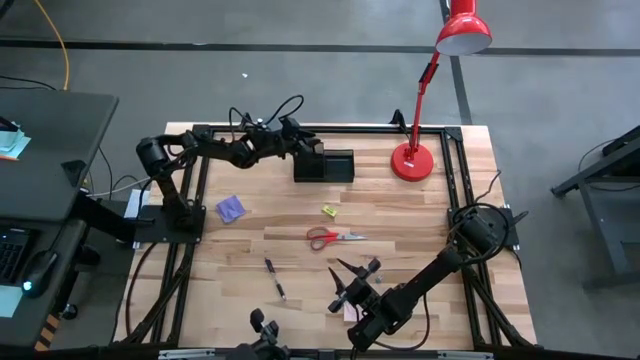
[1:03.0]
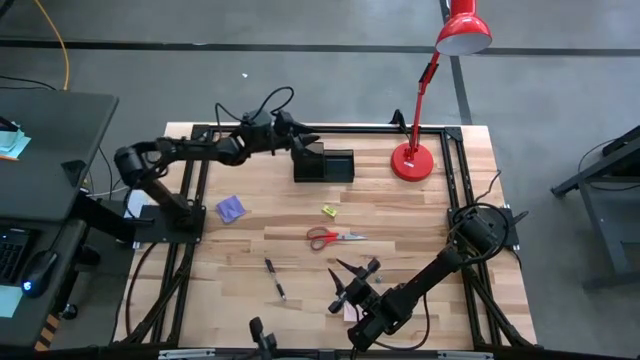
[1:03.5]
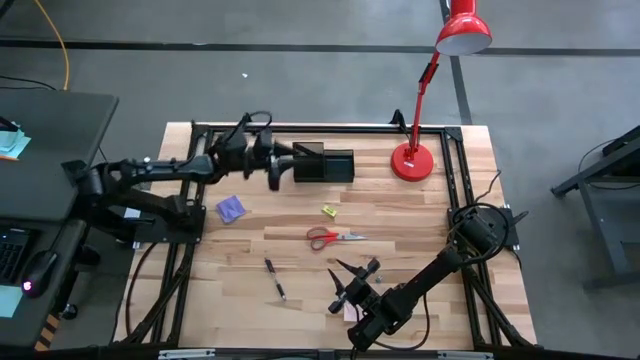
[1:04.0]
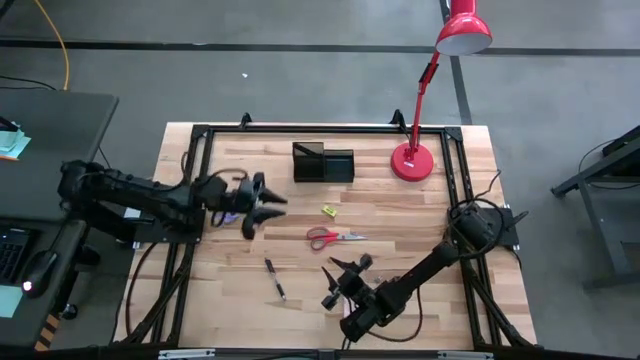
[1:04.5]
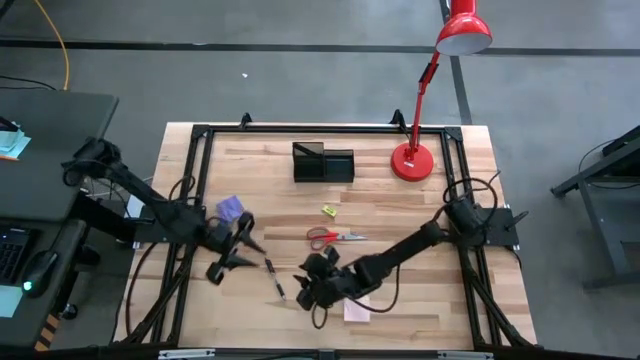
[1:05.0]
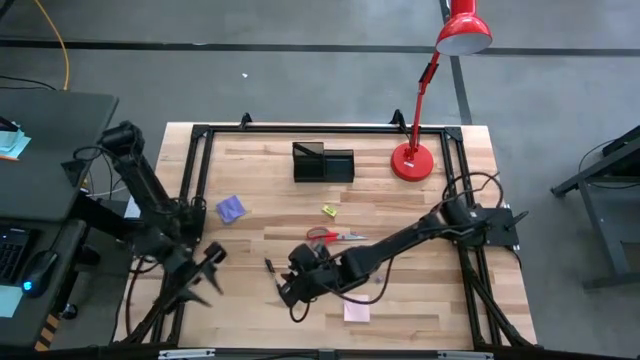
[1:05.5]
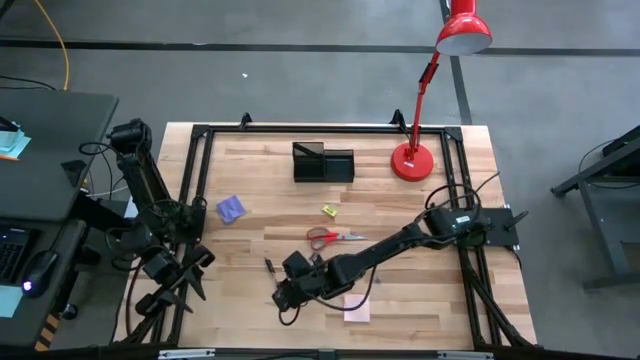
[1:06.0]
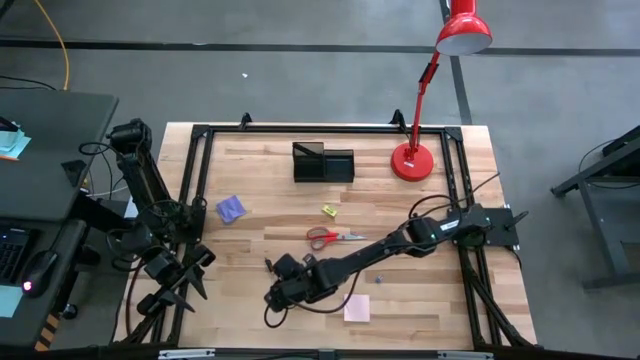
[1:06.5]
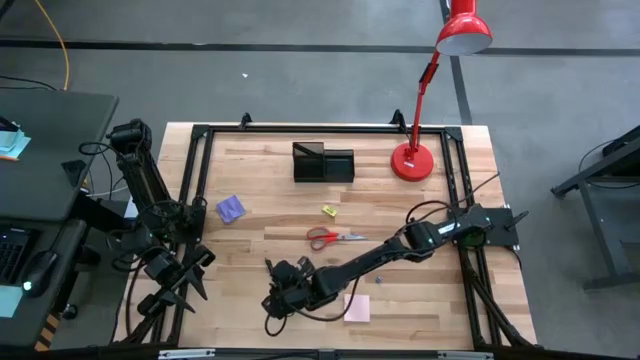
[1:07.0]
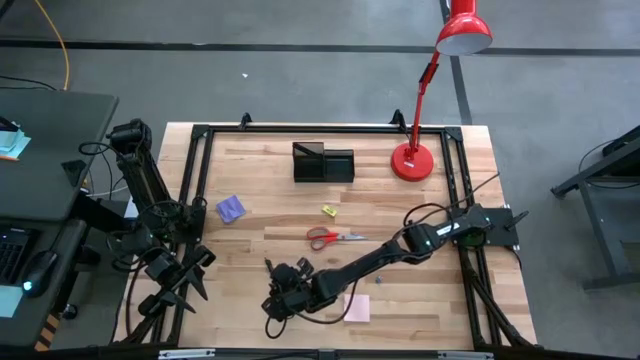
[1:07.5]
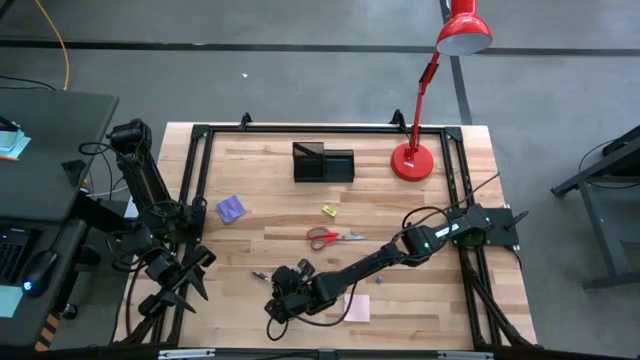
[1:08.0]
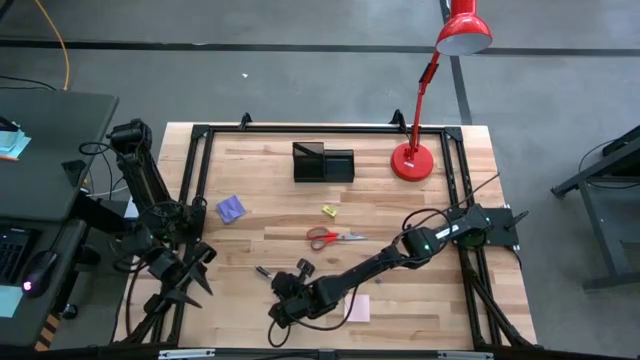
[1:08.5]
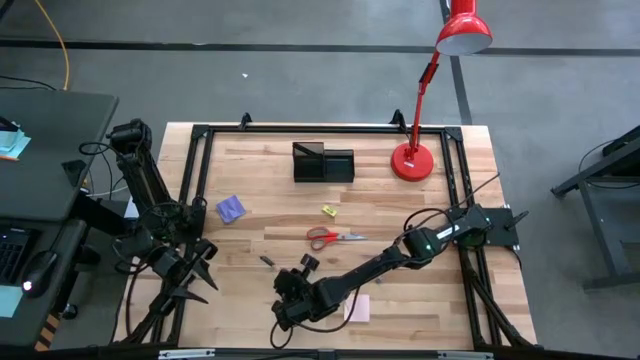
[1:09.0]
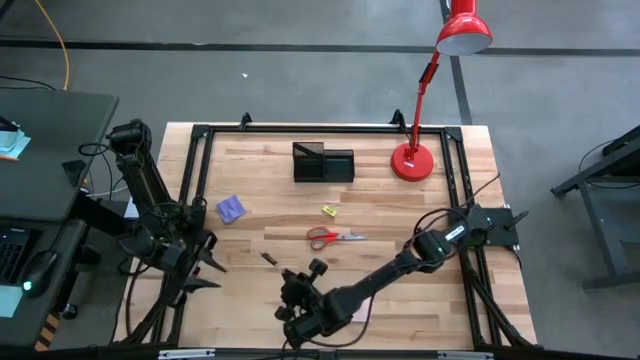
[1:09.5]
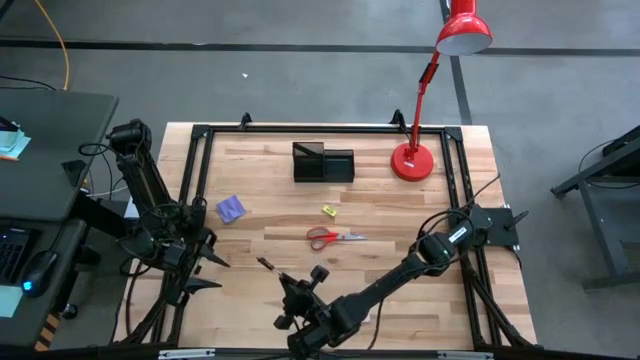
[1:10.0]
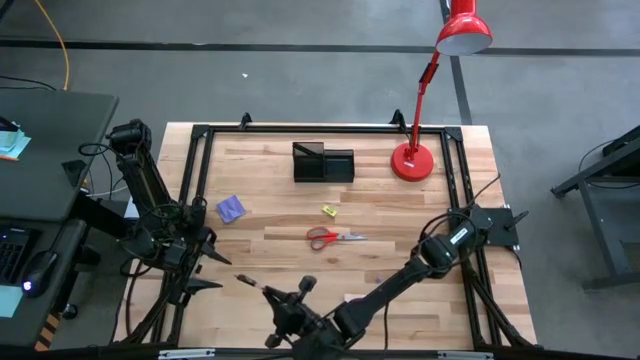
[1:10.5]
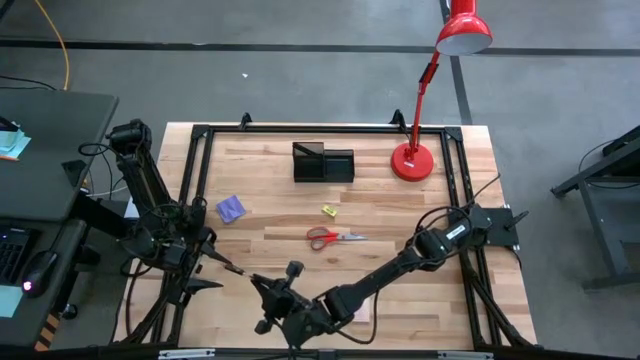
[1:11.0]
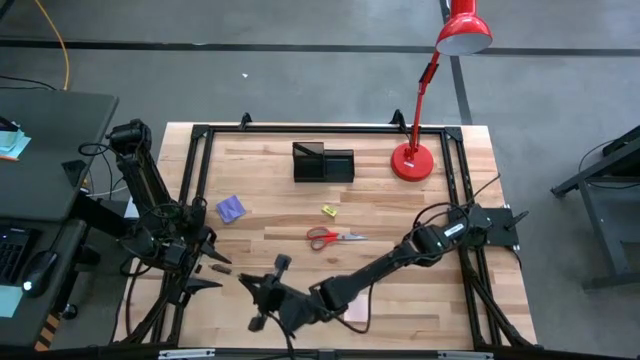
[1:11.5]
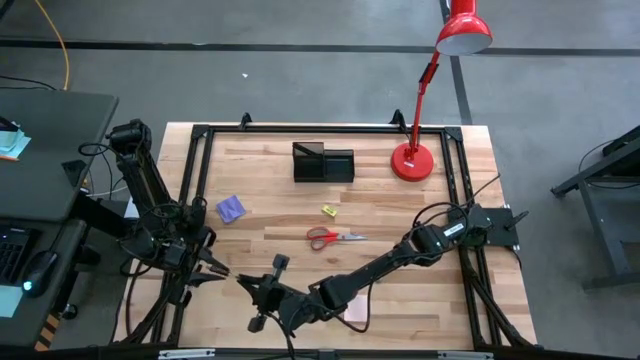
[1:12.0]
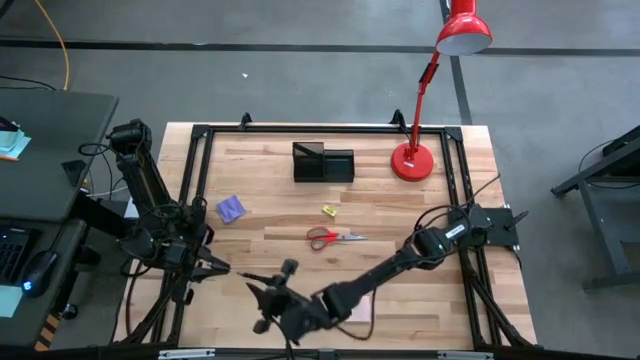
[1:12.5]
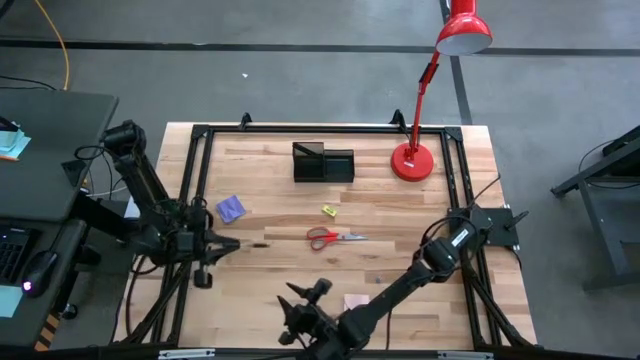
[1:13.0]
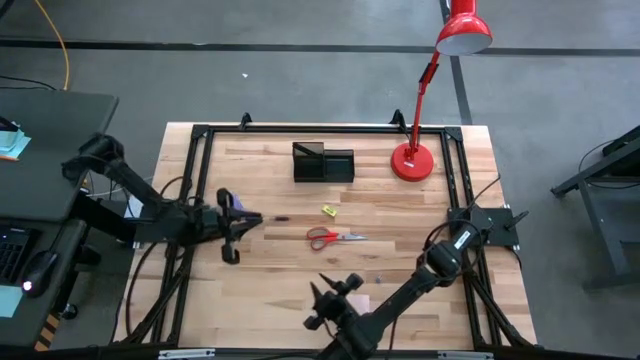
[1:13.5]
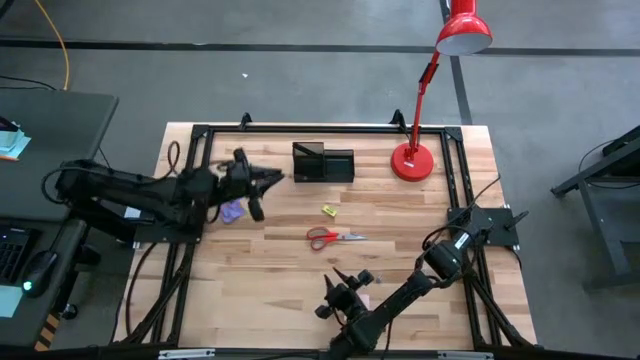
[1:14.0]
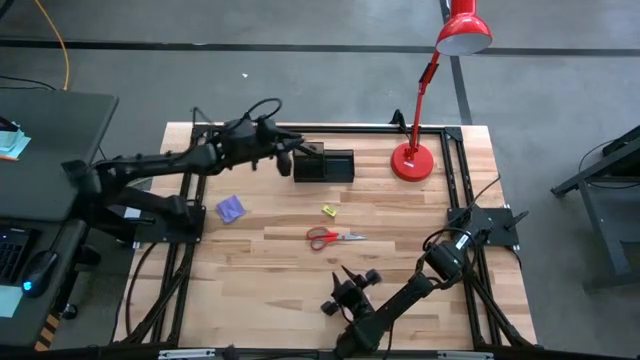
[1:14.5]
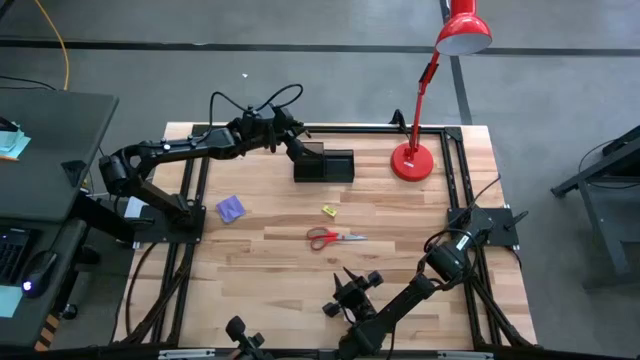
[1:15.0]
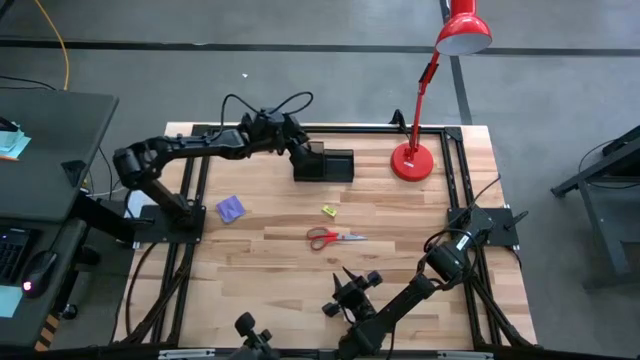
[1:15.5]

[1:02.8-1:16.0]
Task: Pick and place office supplies into organizer
Put the transparent pen into the desk organizer

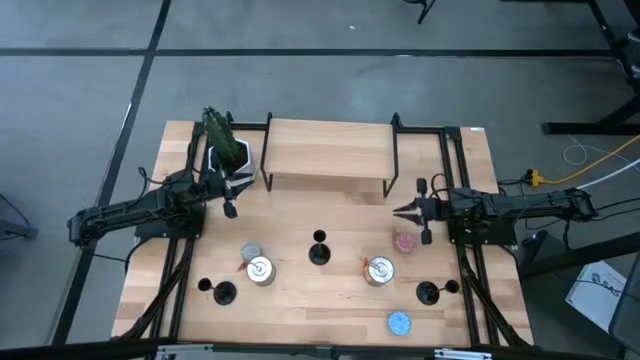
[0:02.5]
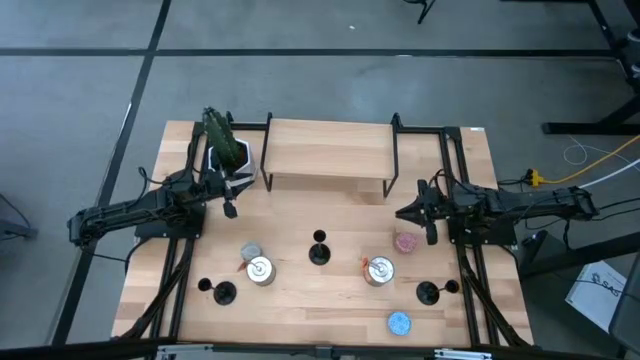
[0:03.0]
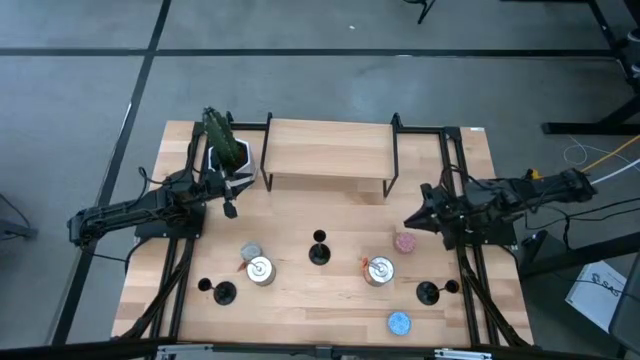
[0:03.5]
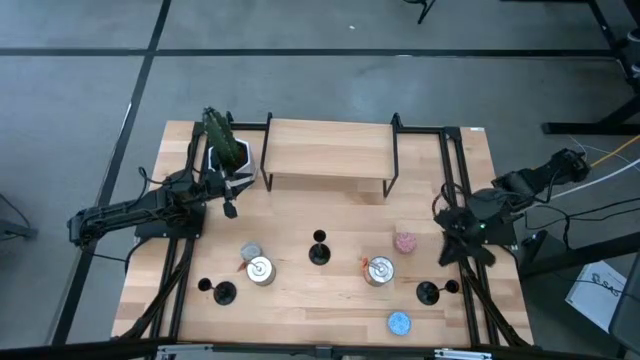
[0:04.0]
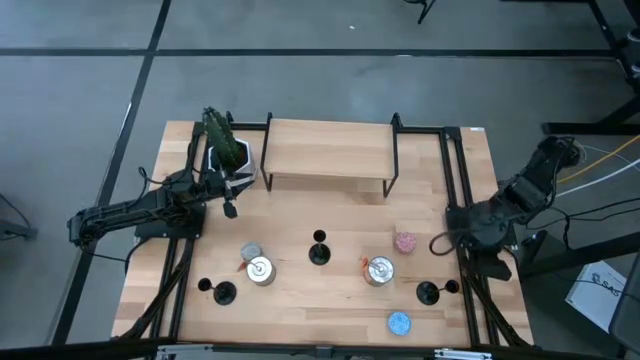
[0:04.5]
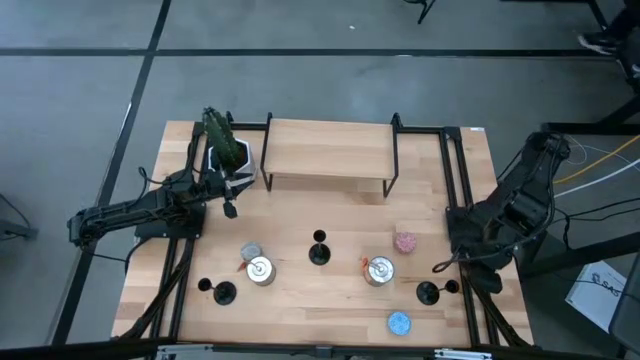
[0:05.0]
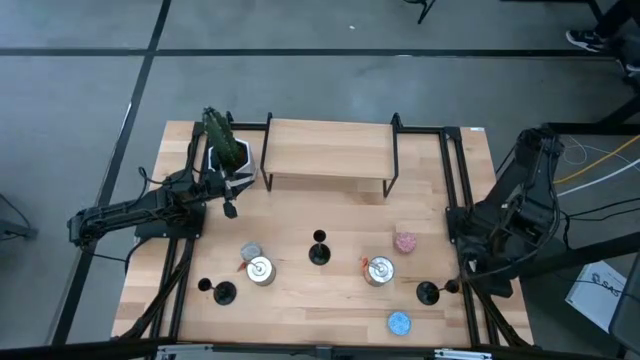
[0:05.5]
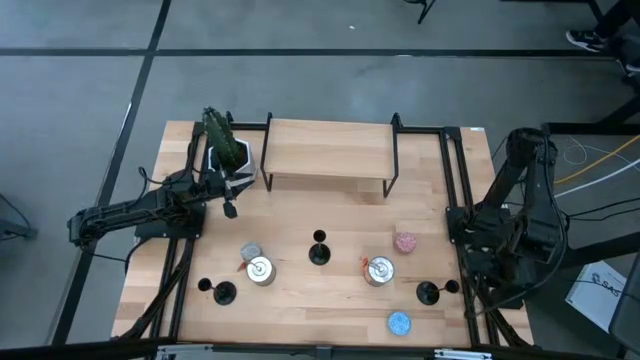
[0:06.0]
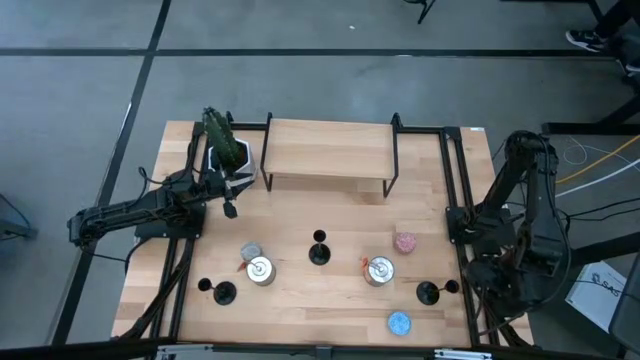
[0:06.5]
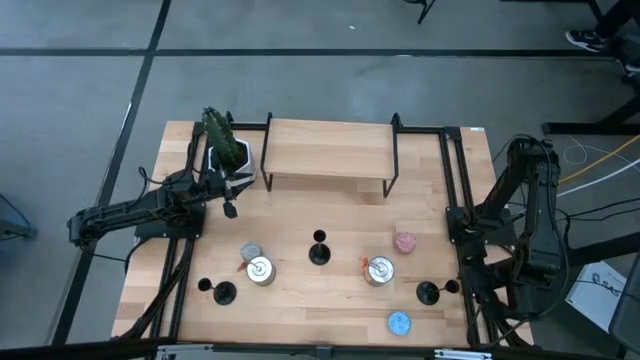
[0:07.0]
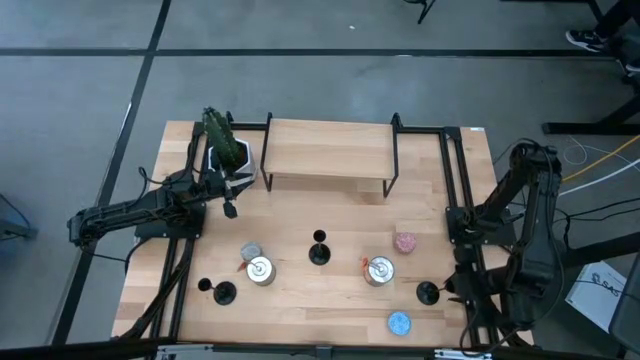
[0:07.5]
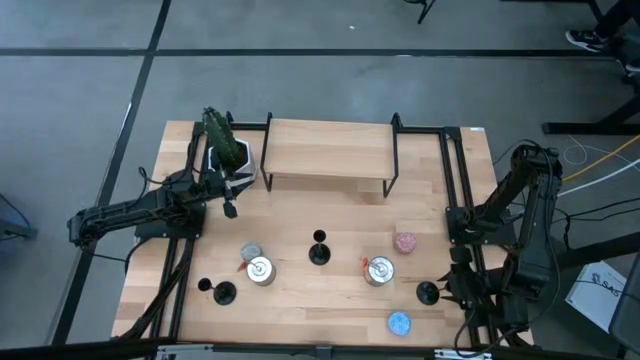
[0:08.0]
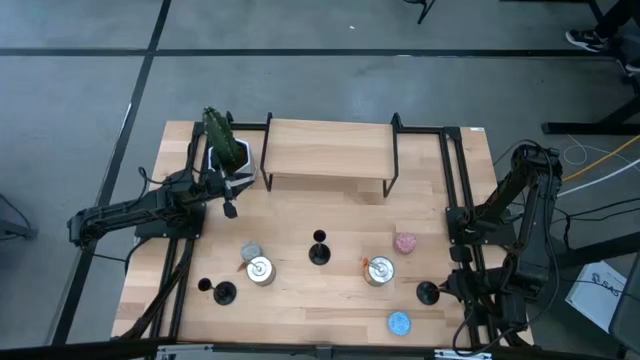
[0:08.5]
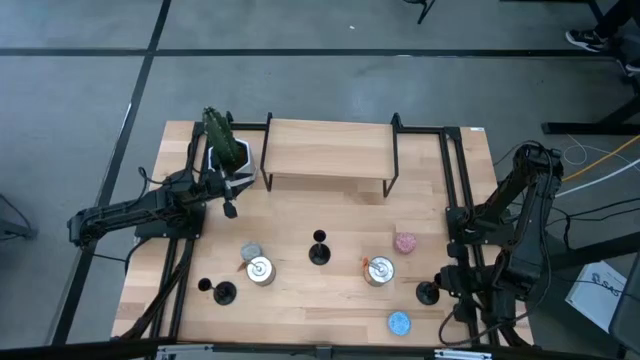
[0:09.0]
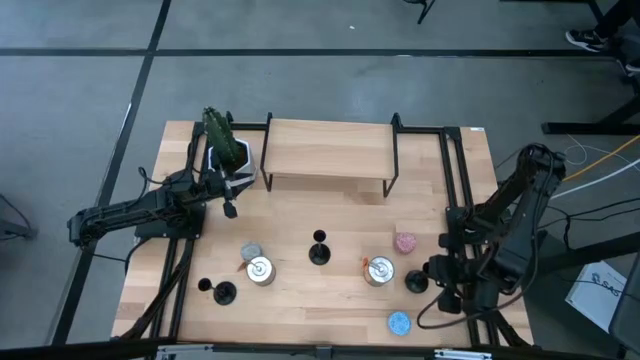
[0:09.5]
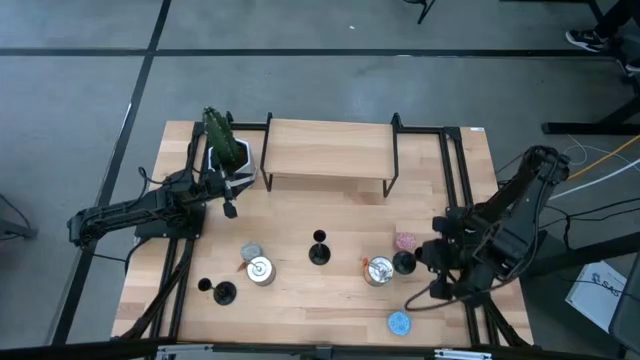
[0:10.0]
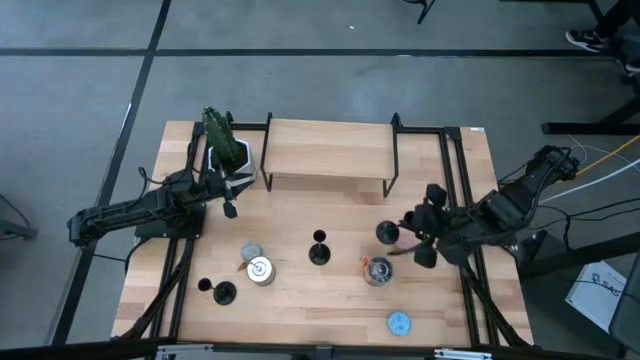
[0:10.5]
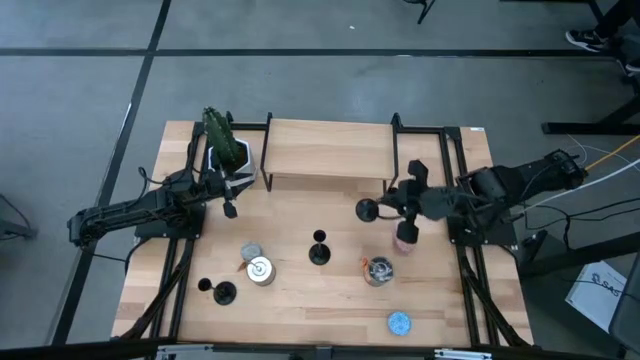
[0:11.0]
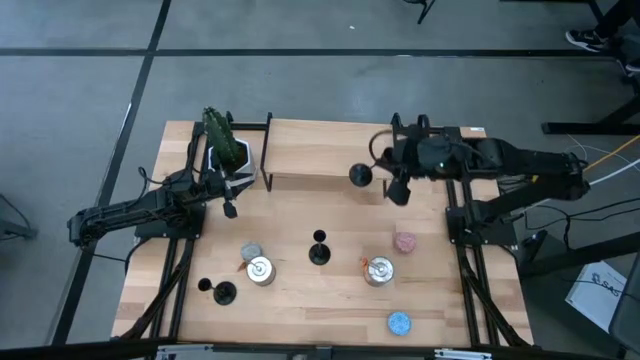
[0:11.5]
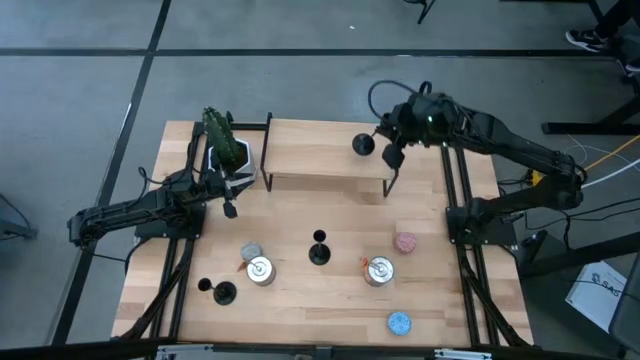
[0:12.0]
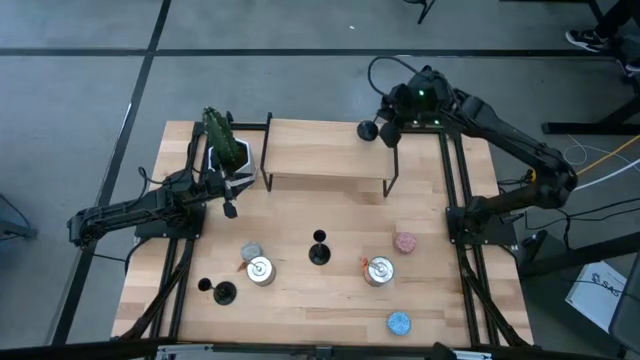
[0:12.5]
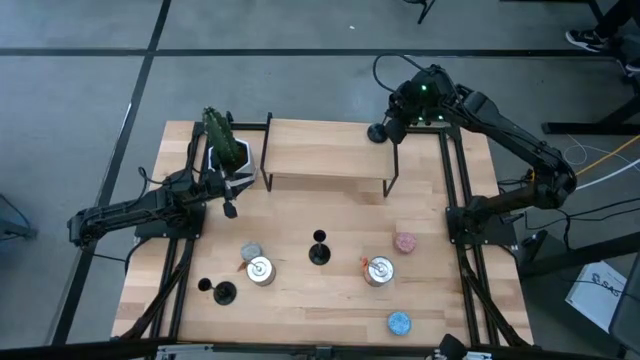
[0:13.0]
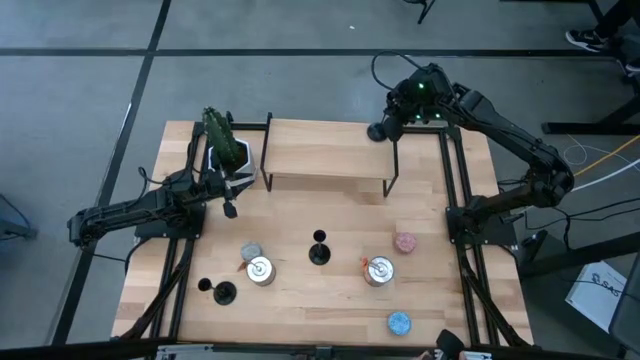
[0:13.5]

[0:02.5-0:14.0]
Task: Pick & Place candle stick holders
Put the right black candle holder on the shelf
